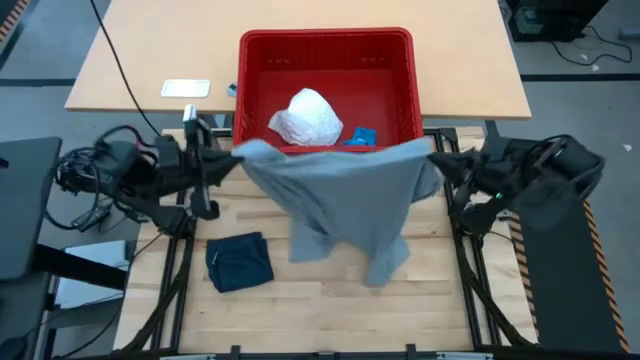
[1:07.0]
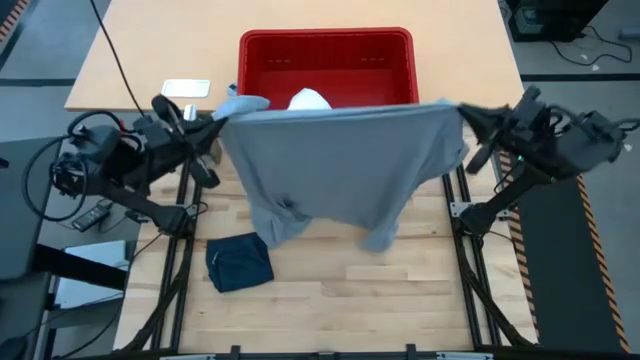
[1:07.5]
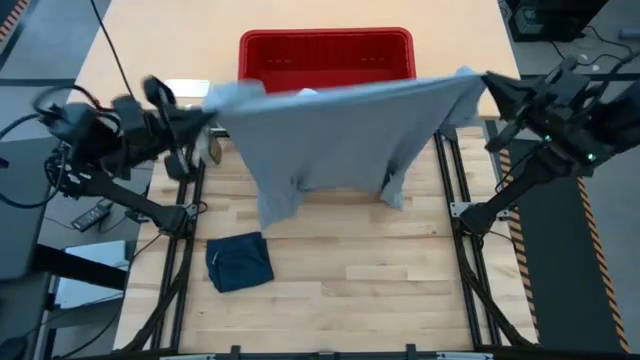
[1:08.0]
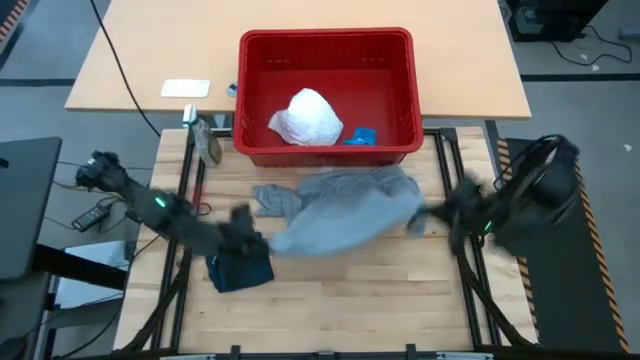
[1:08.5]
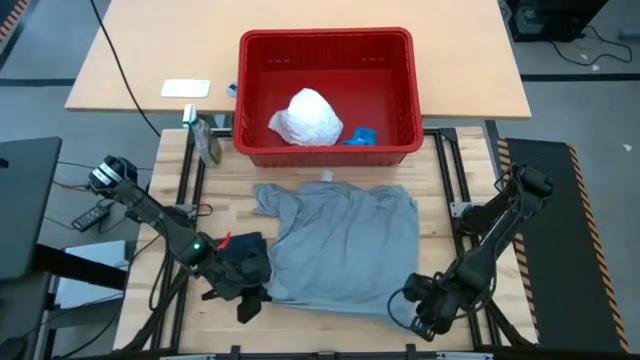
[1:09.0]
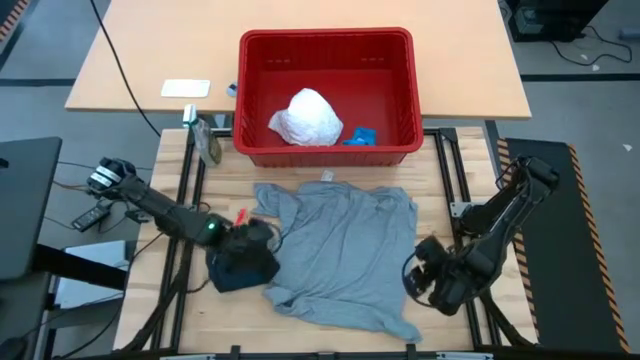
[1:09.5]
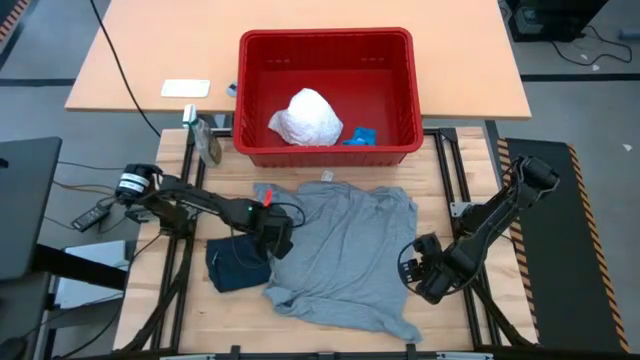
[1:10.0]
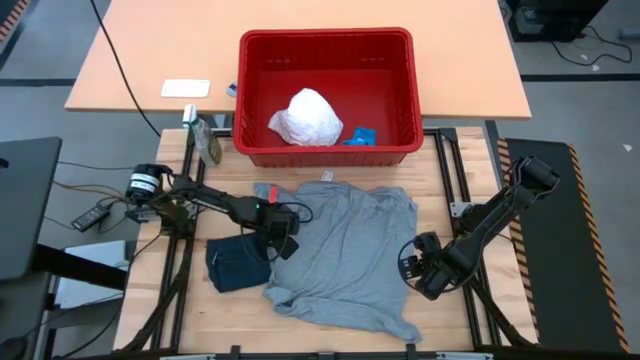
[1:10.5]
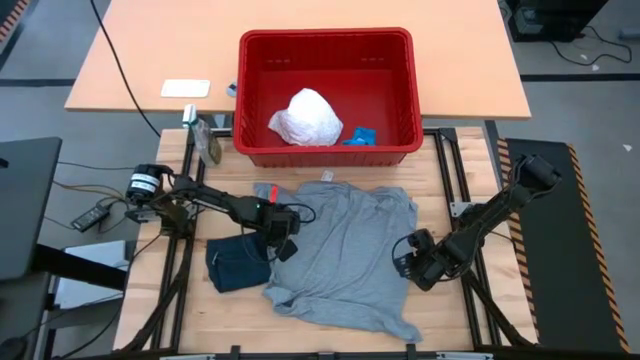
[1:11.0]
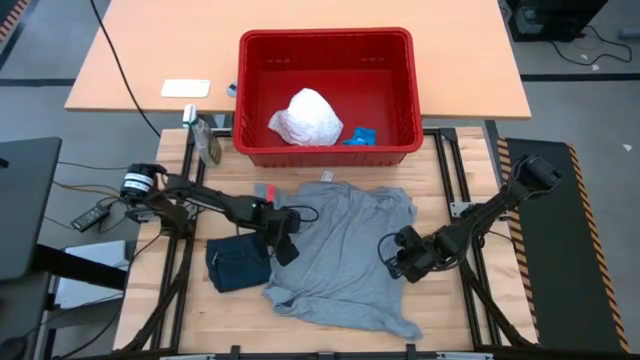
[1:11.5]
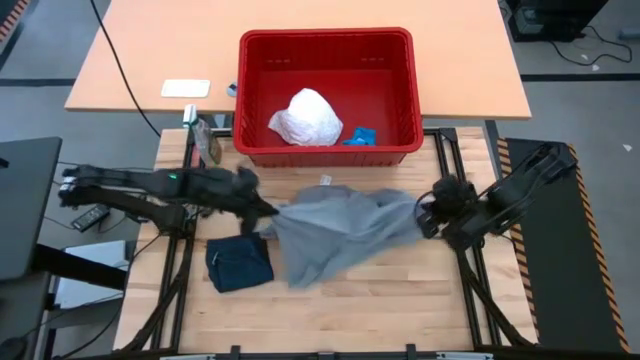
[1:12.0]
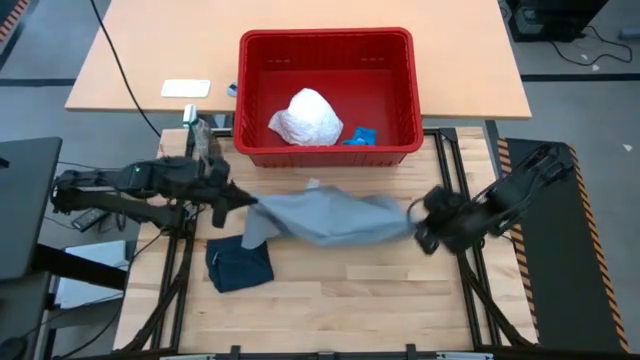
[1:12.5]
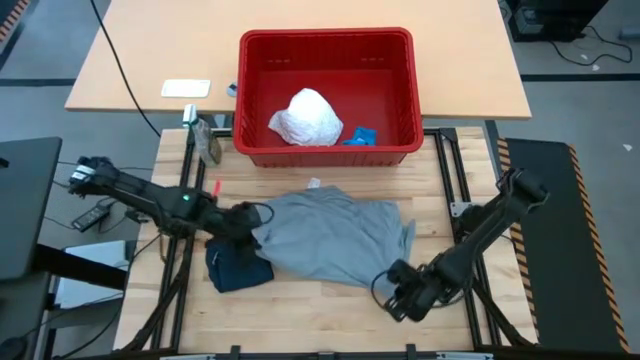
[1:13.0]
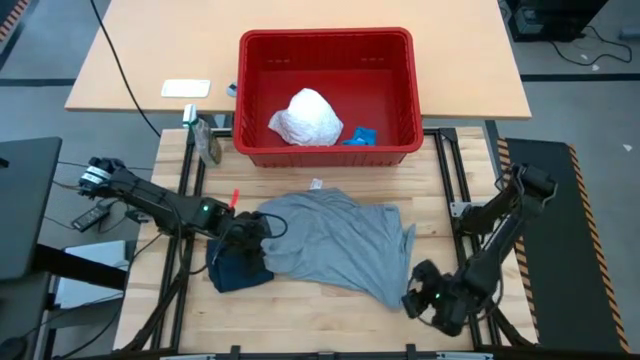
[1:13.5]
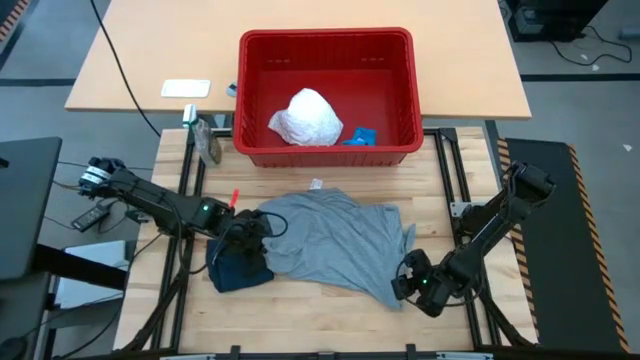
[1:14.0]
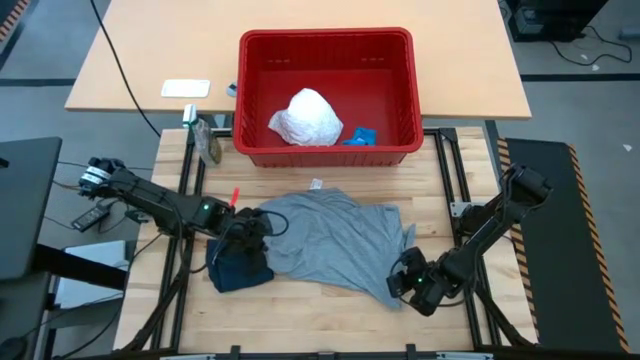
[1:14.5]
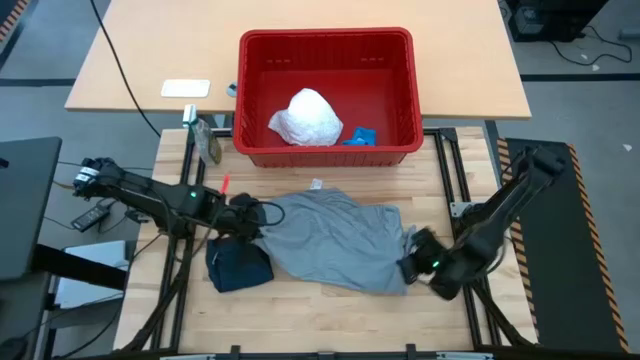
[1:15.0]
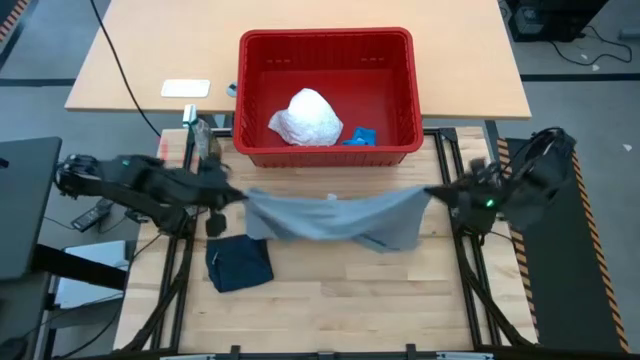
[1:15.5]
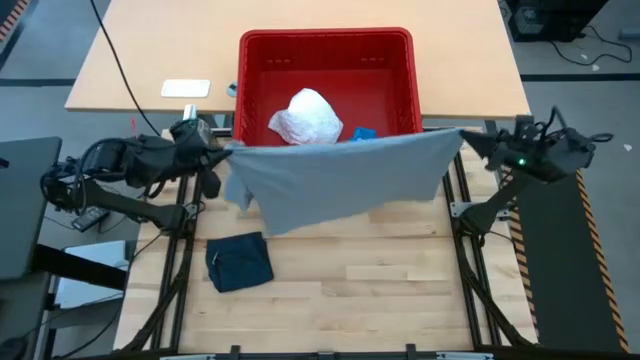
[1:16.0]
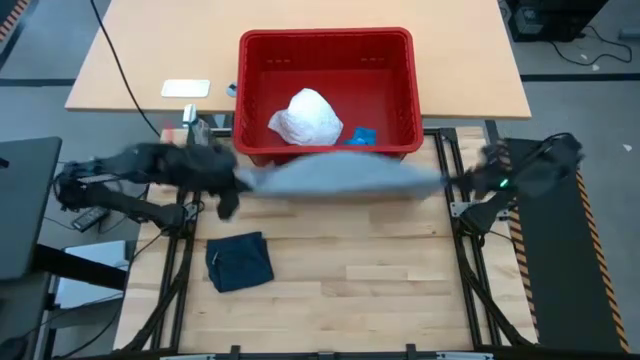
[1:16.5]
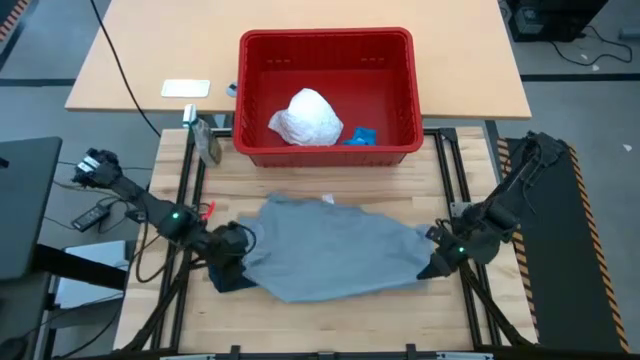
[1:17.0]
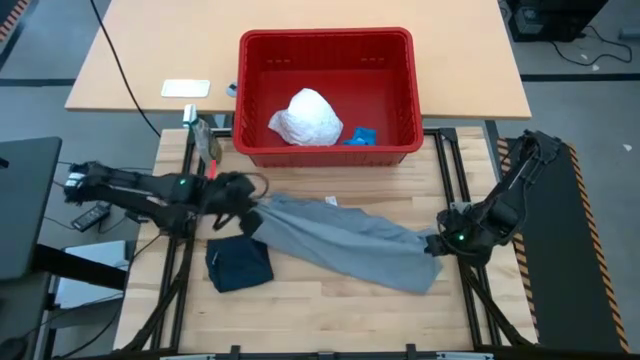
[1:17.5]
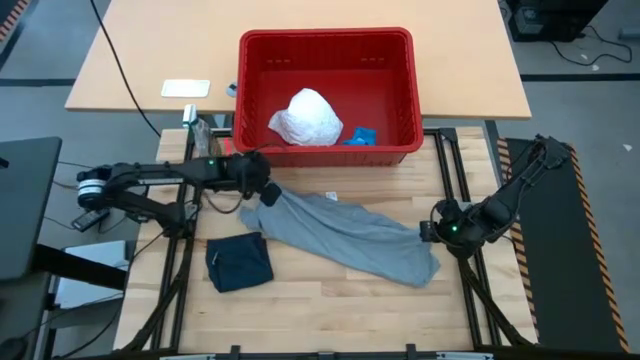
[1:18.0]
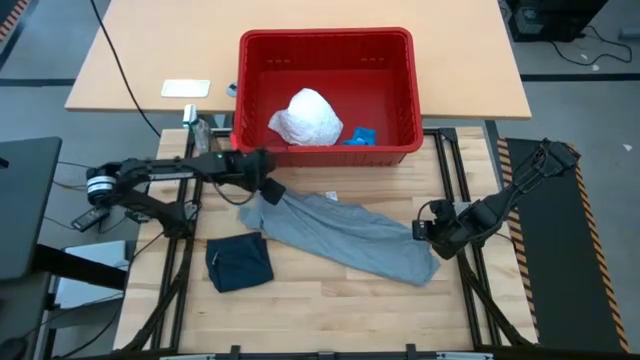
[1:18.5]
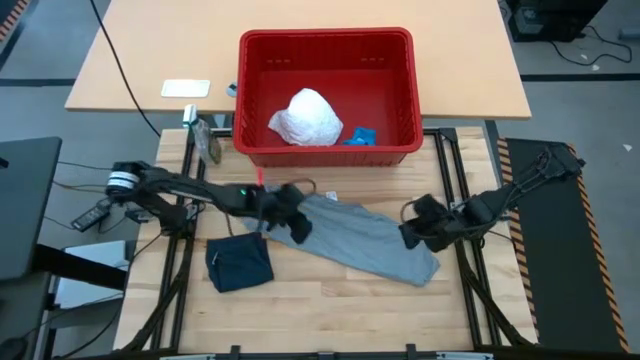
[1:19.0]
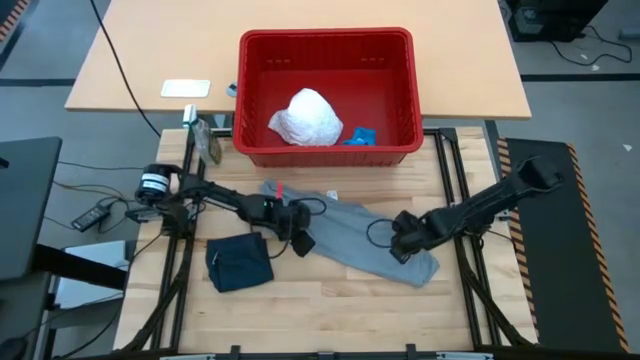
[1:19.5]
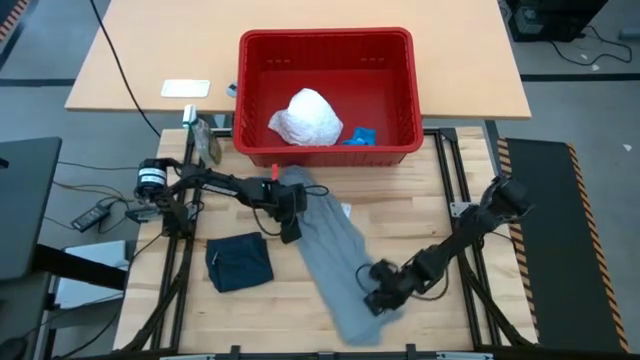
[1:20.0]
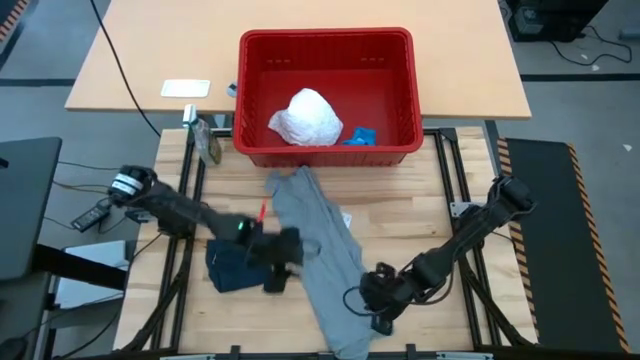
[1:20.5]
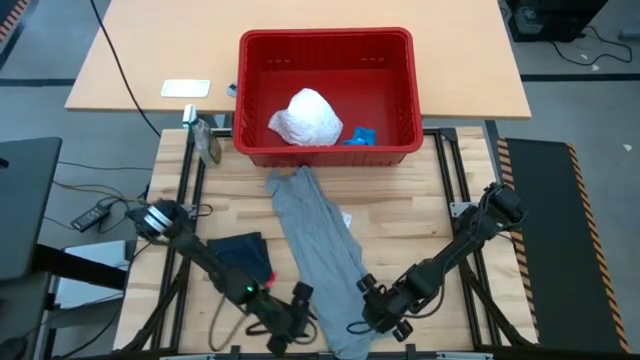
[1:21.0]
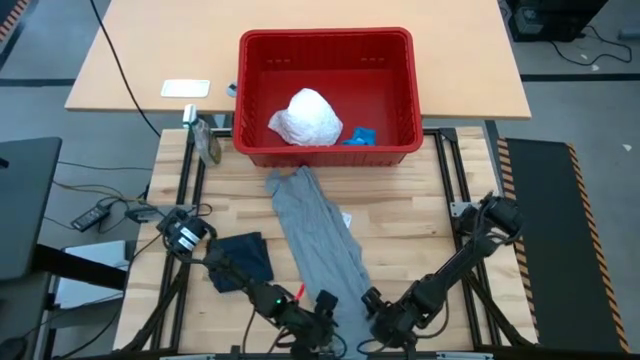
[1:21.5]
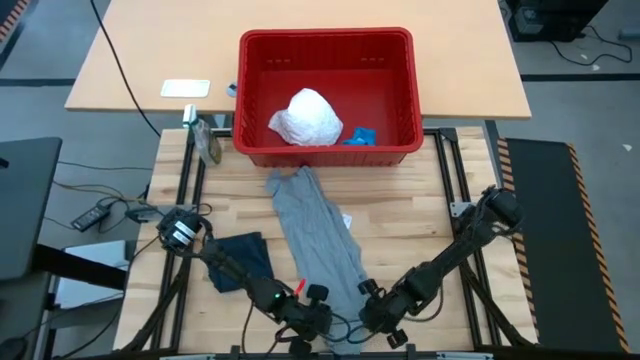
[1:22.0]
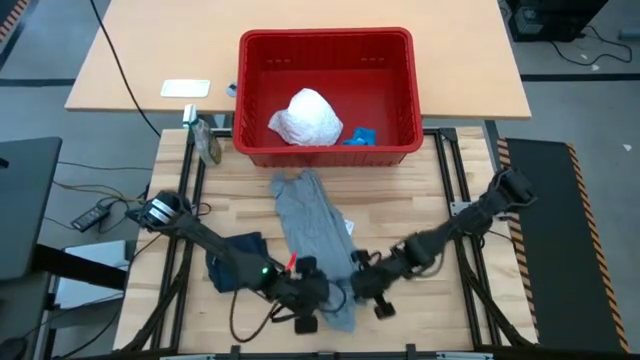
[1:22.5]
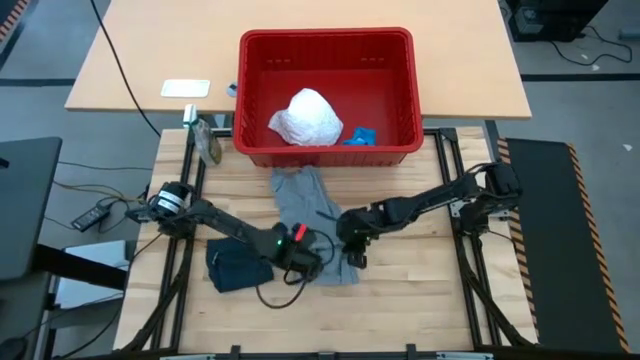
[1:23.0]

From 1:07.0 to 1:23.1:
Task: Fold laundry
Fold the gray shirt

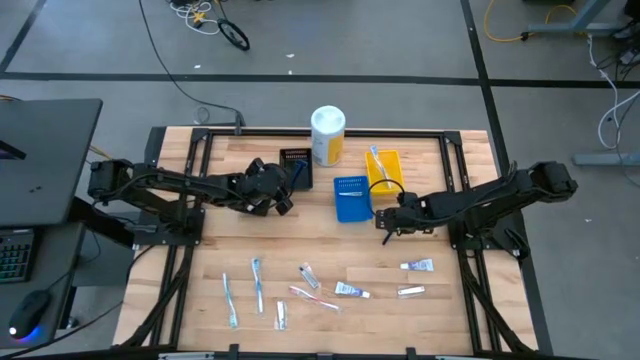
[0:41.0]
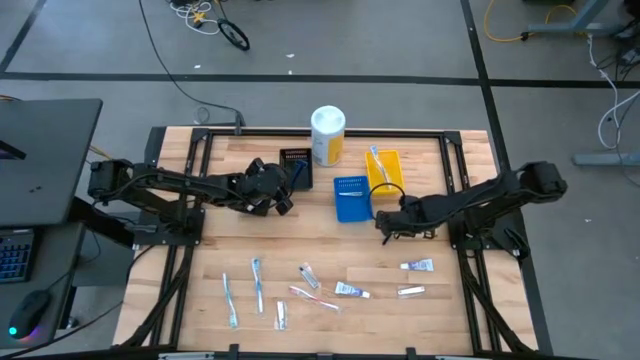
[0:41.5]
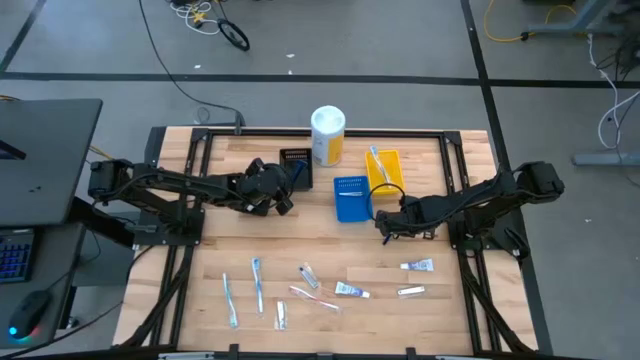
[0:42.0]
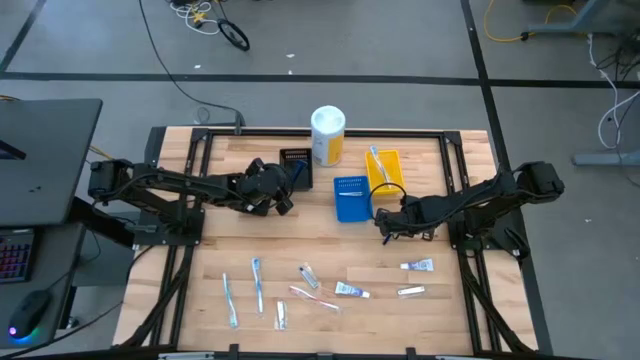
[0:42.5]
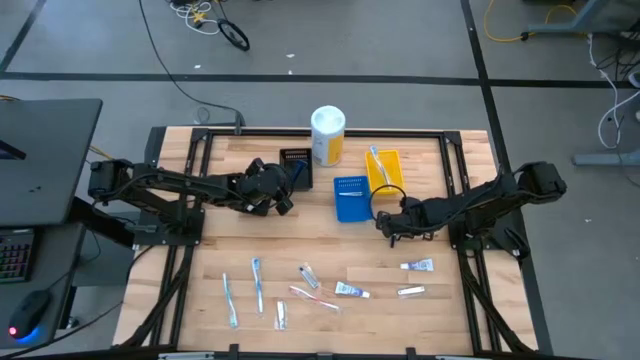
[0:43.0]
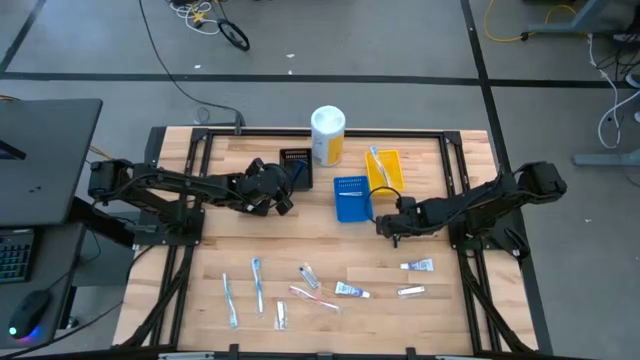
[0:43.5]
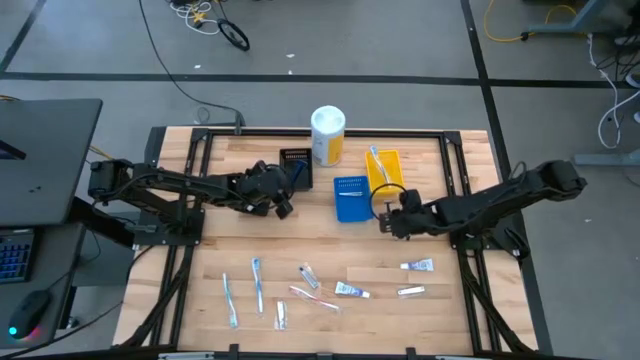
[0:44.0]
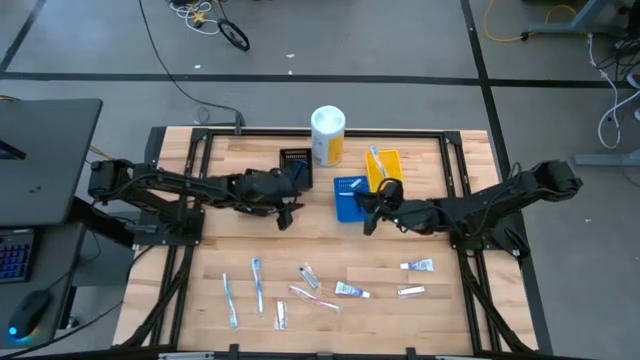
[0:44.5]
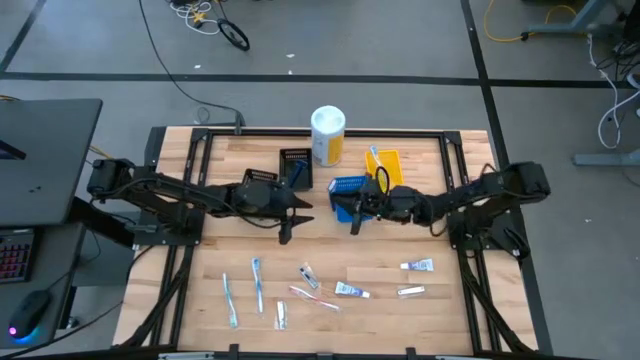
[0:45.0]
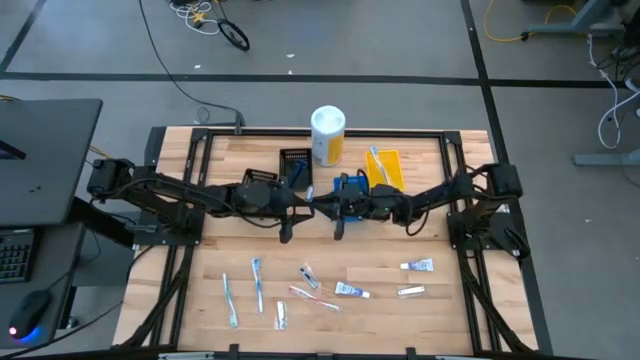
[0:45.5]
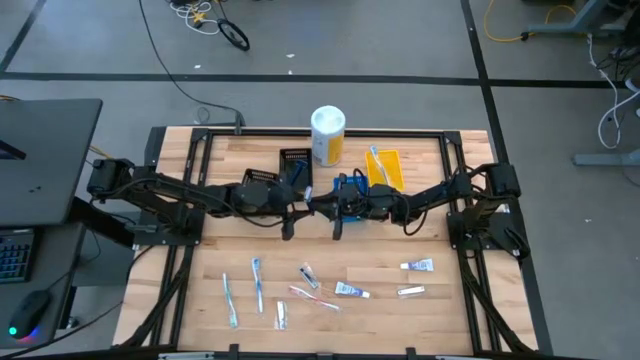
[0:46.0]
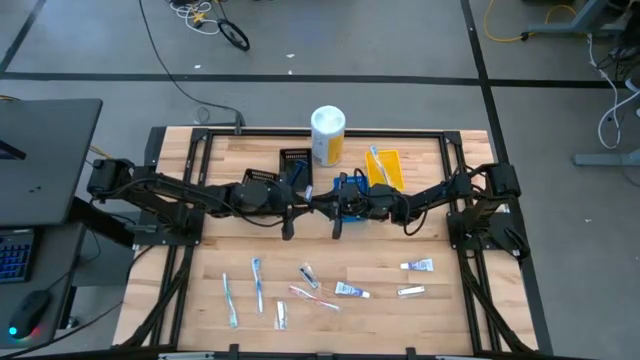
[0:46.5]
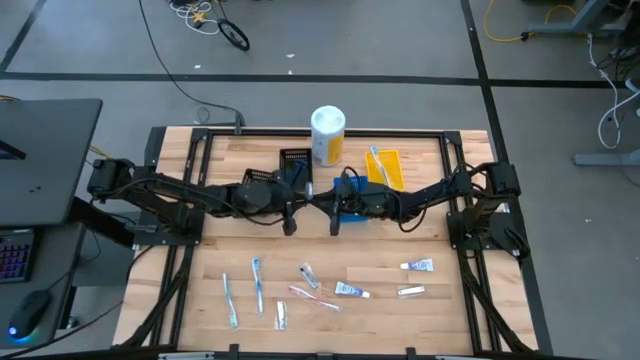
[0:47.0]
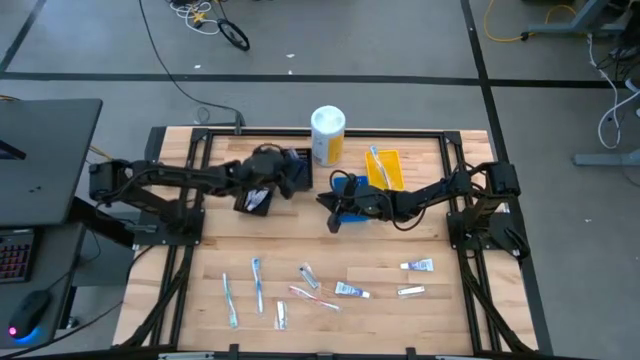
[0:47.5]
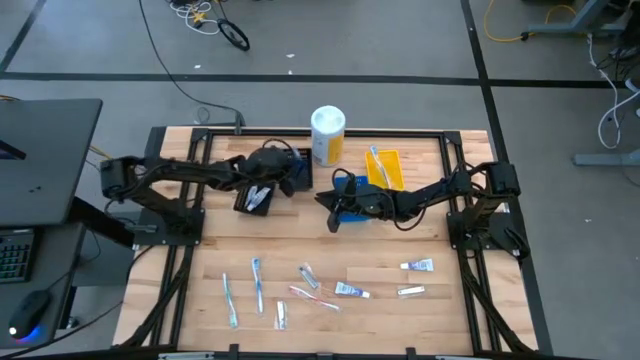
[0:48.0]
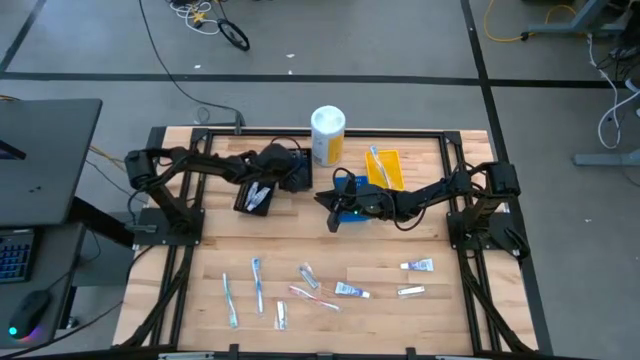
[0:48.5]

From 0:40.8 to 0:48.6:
Task: Pick & Place Travel size toiletries
Put the blue razor into the right black bin
